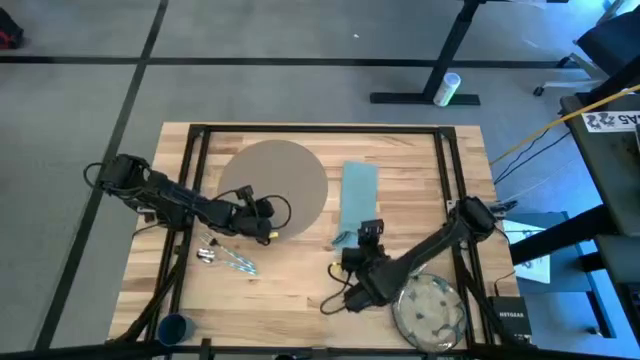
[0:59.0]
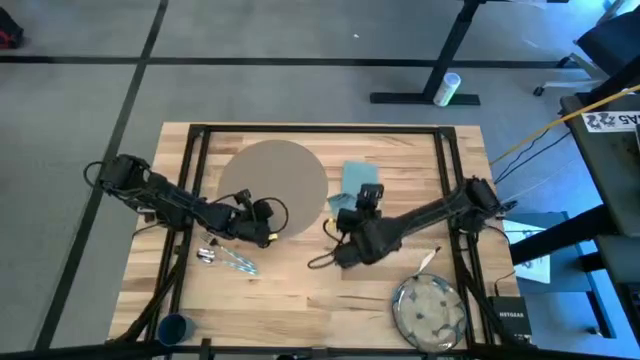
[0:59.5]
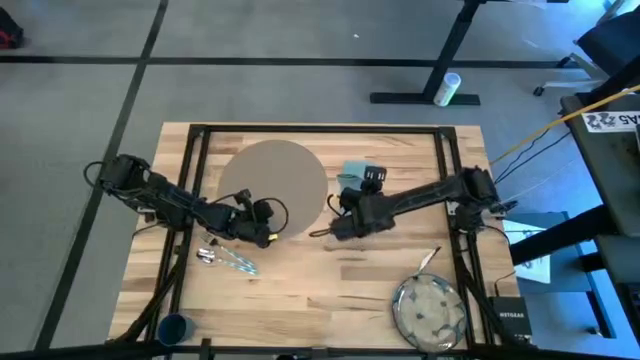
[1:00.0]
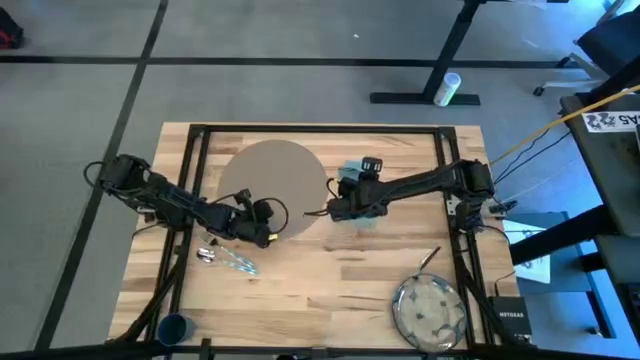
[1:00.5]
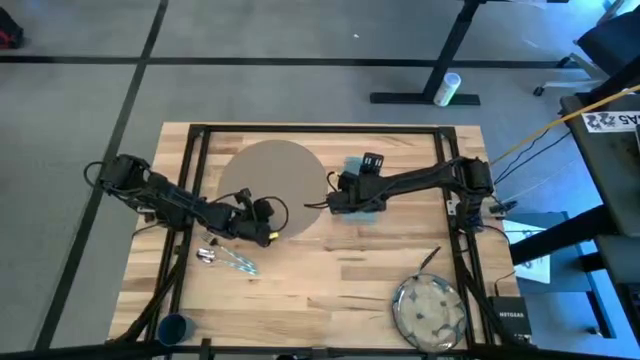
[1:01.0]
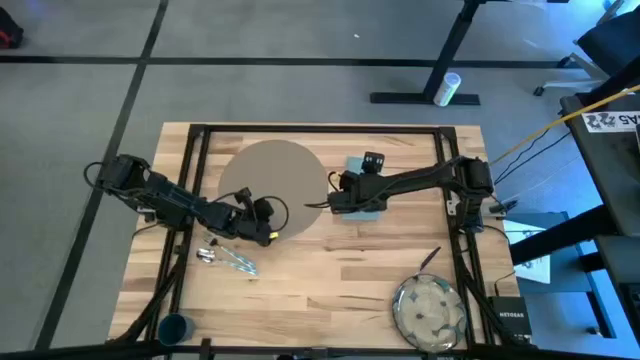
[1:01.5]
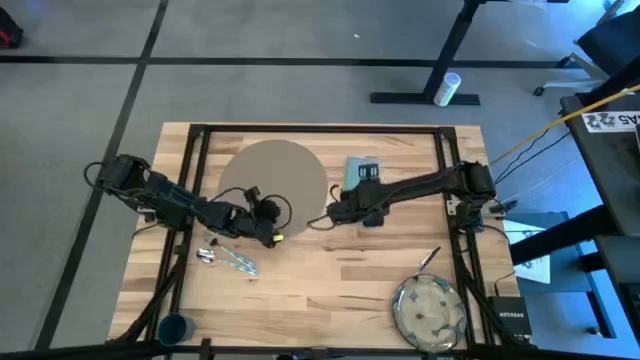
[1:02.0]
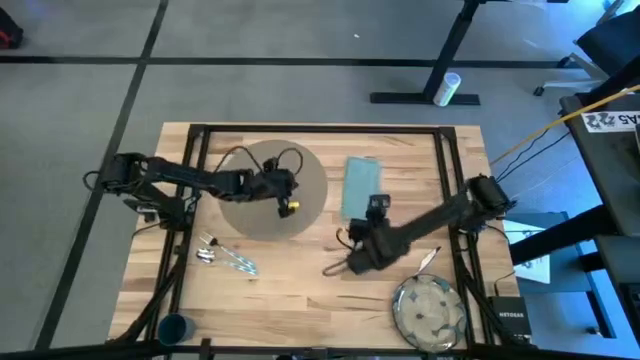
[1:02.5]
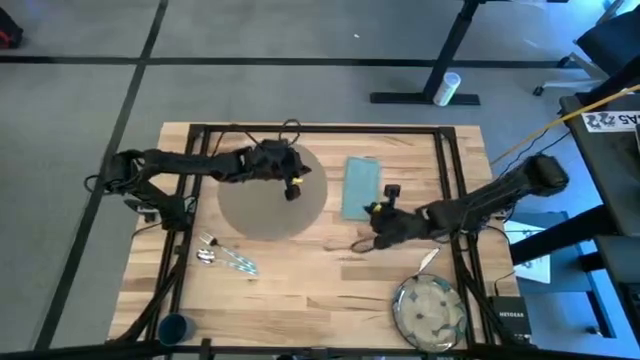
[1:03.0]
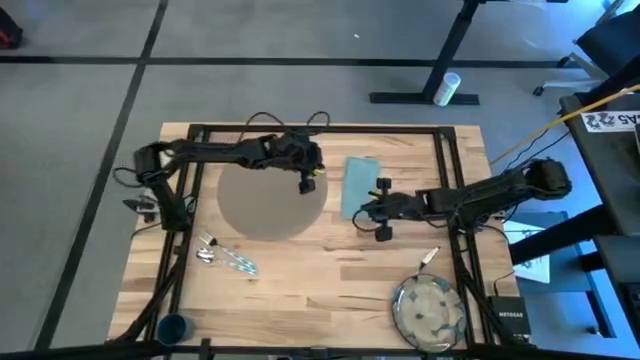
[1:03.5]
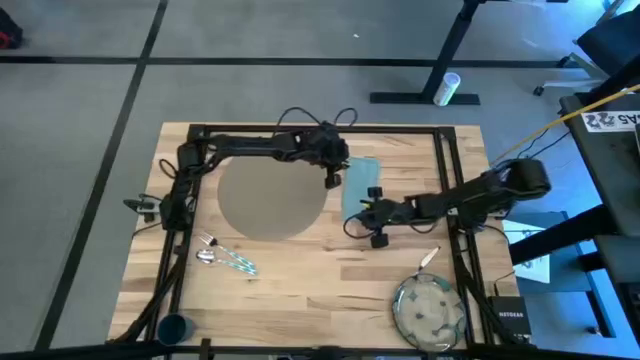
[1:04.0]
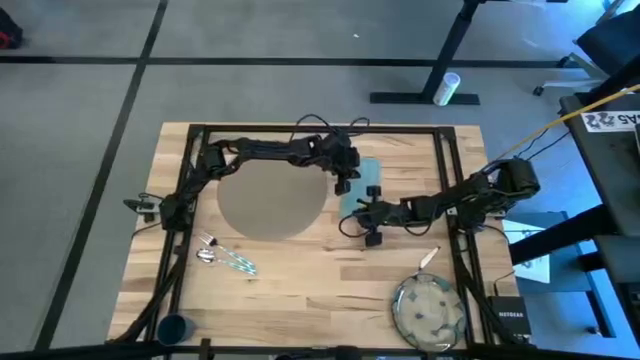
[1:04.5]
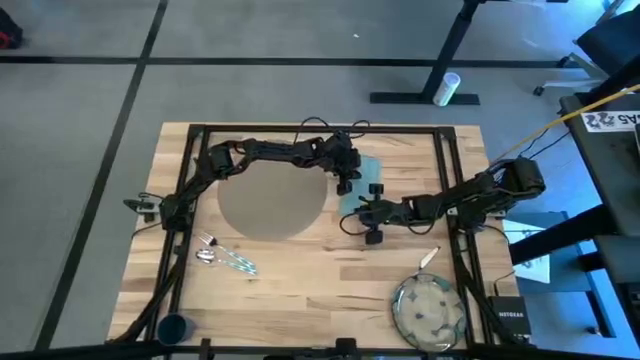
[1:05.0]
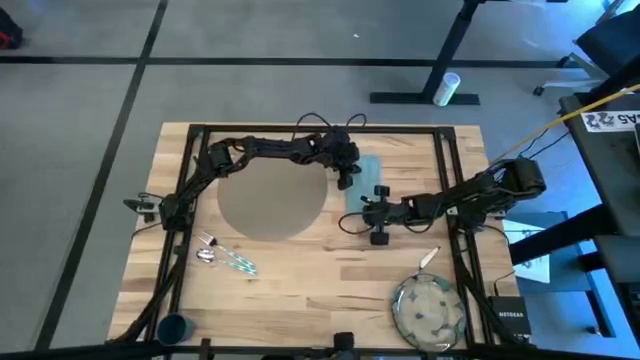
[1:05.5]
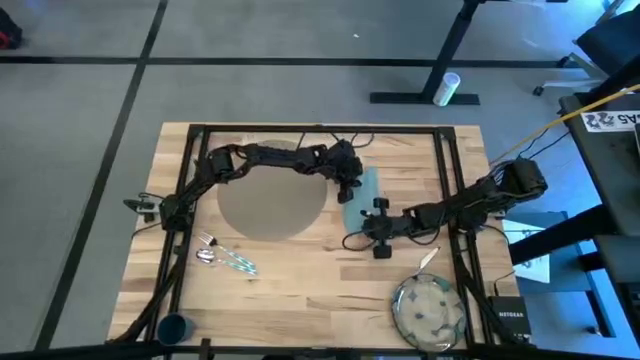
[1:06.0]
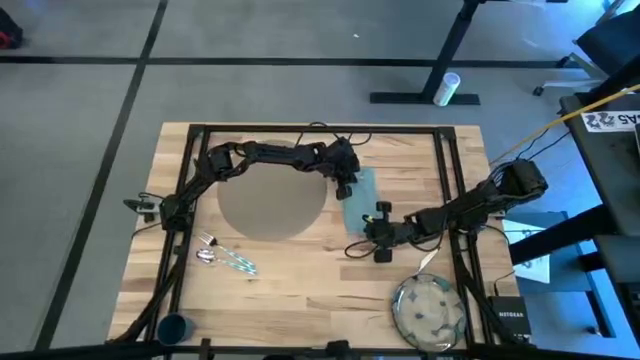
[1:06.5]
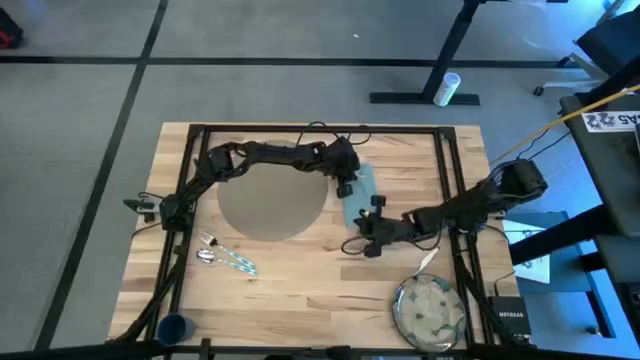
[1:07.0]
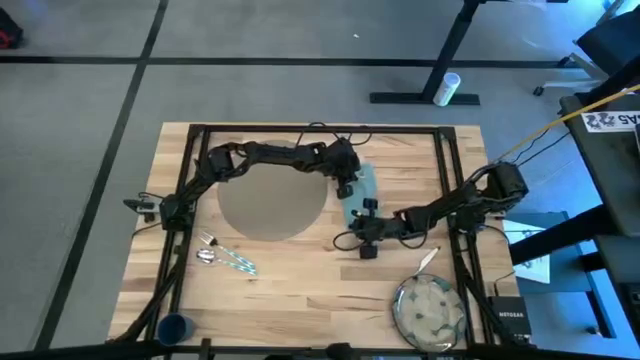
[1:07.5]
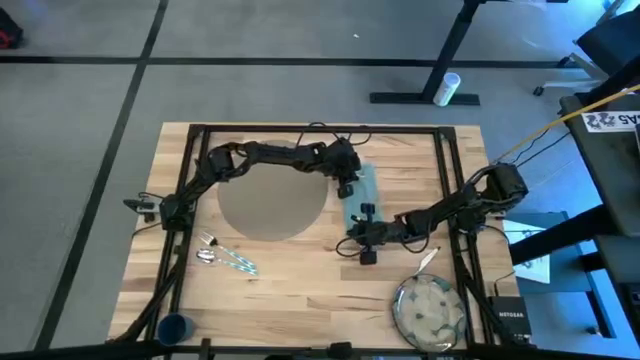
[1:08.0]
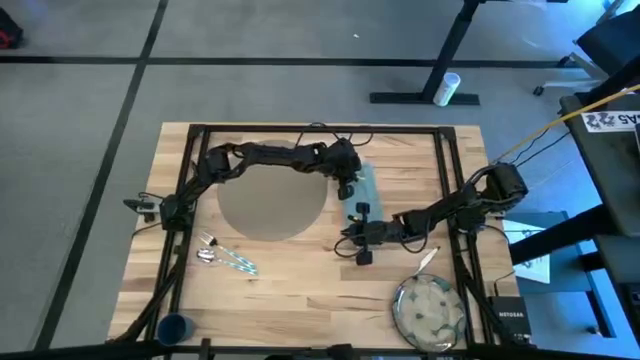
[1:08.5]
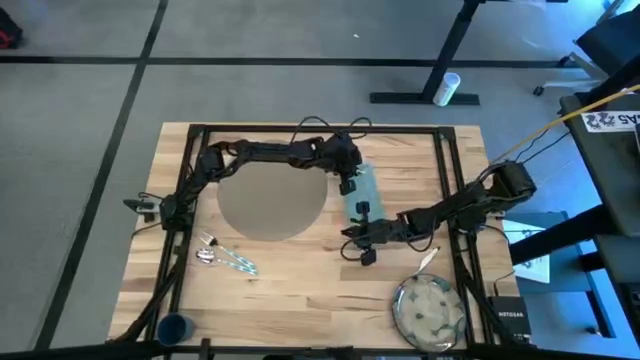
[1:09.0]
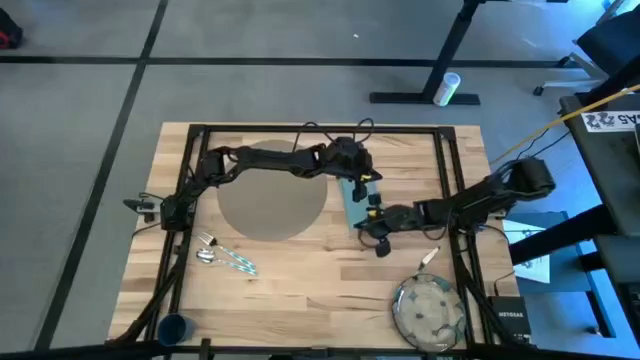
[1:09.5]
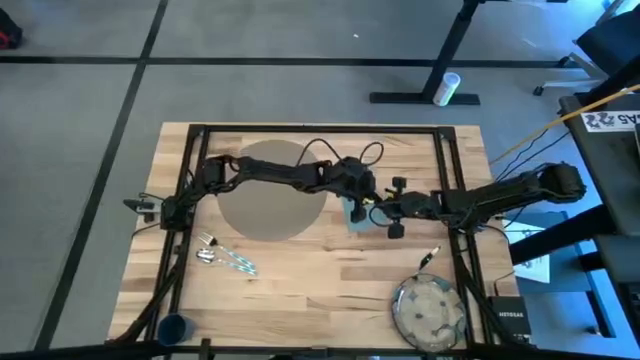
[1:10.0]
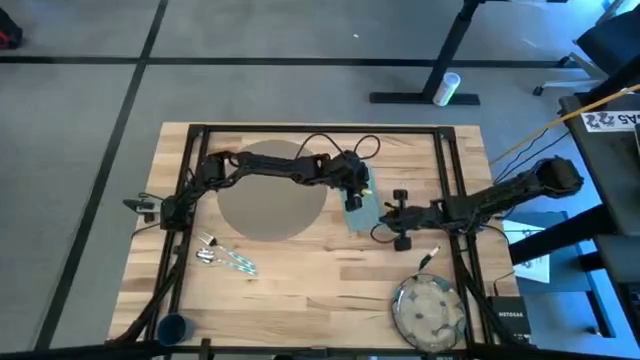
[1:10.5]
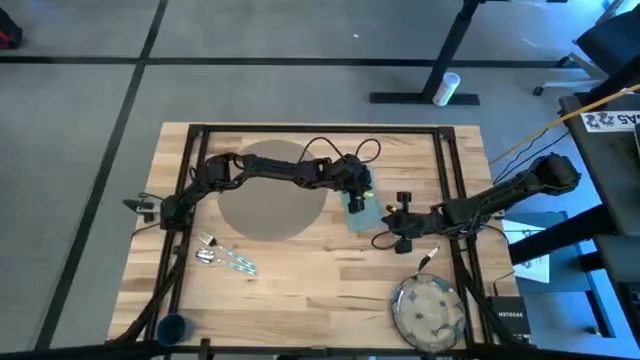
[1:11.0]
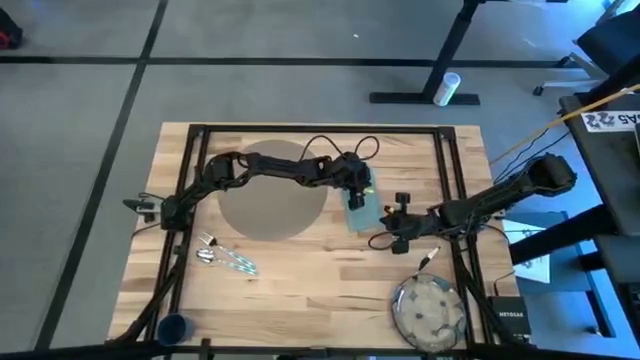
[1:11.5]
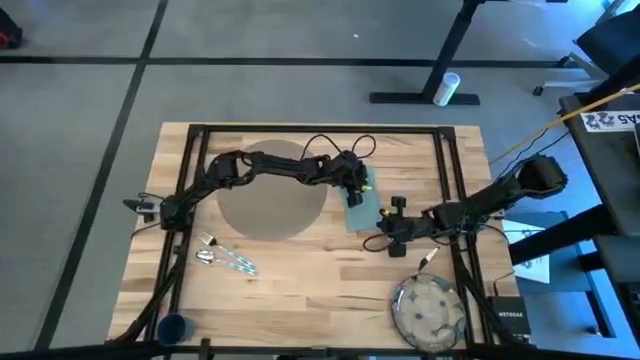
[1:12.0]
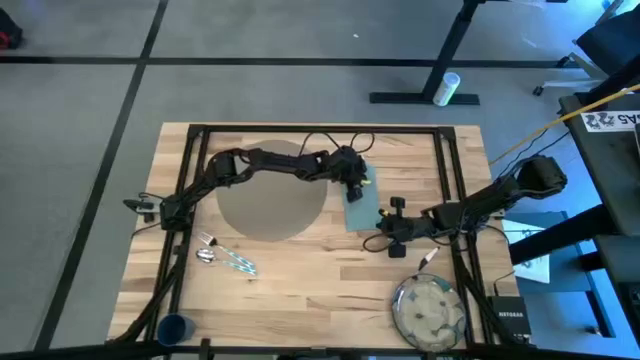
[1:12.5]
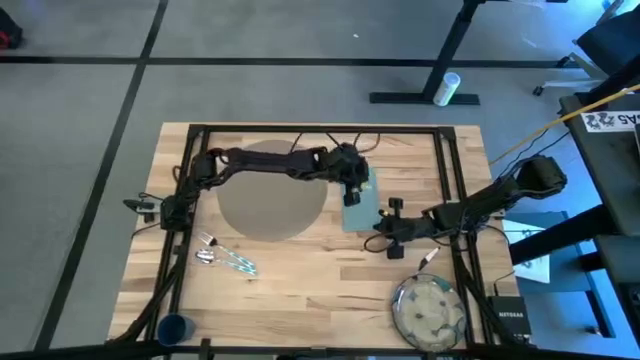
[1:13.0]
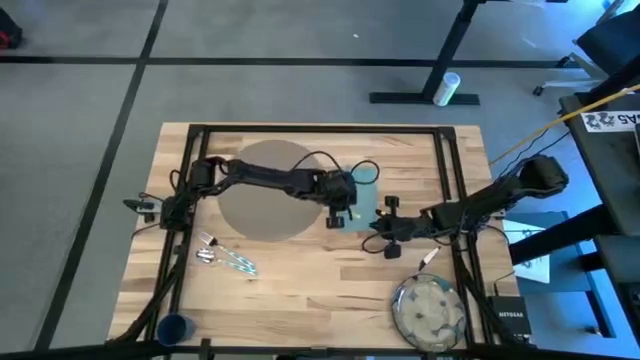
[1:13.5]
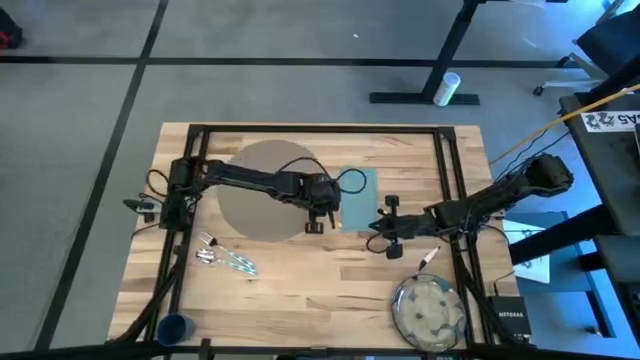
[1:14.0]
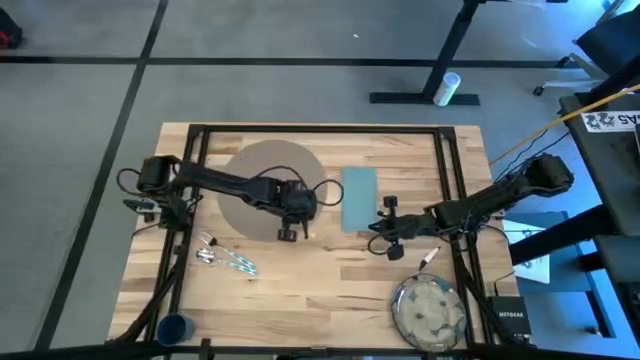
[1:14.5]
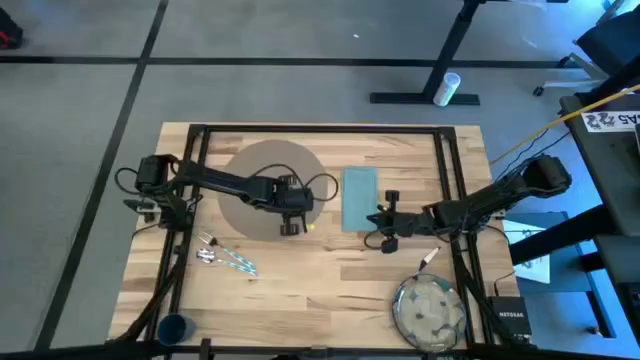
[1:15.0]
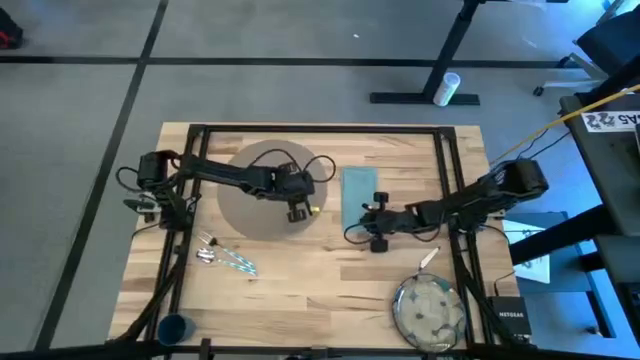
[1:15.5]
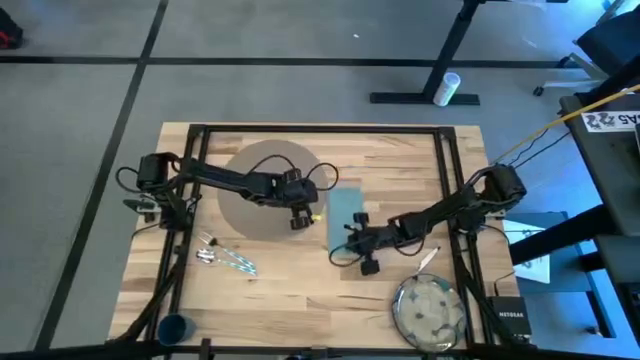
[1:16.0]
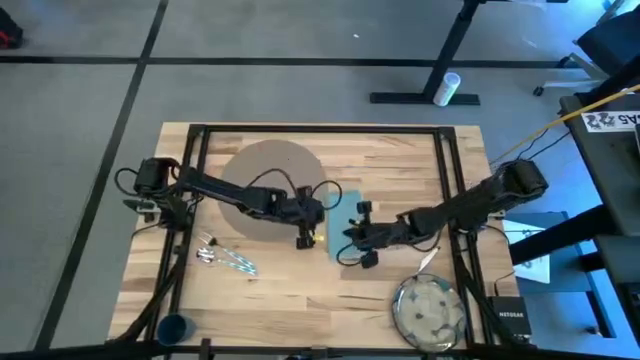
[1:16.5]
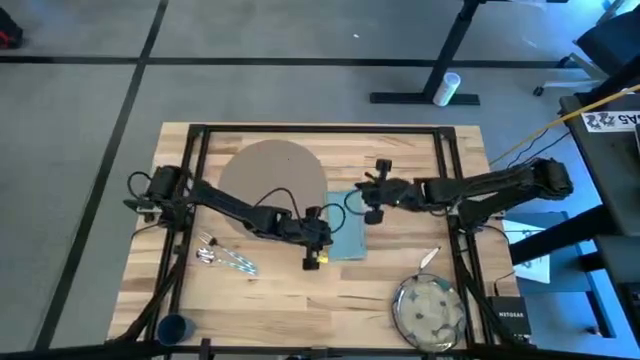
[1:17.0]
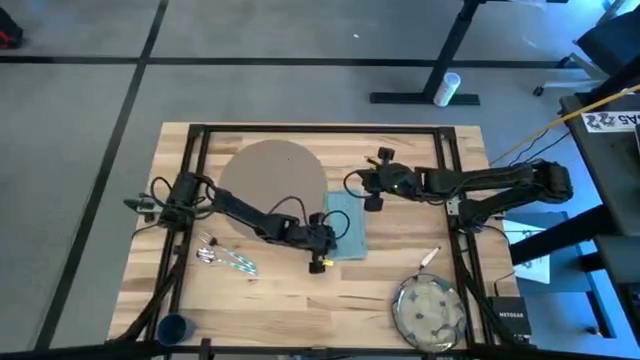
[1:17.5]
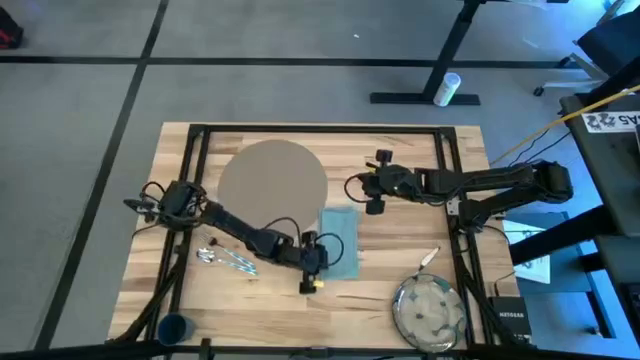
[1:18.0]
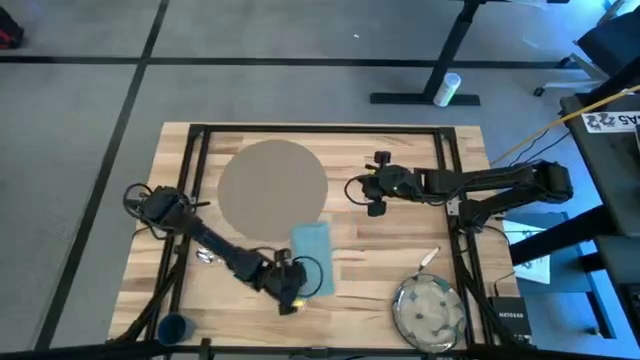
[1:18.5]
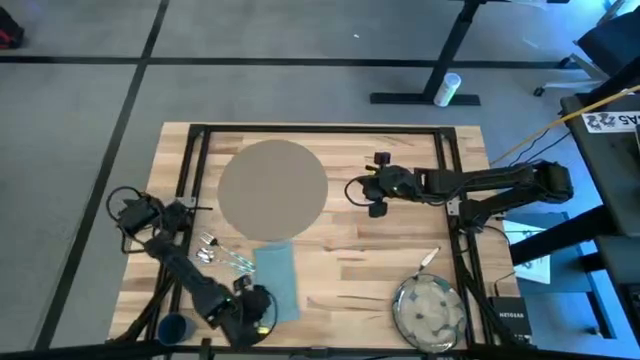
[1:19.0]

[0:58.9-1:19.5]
Task: Set table place
Fold the blue table napkin

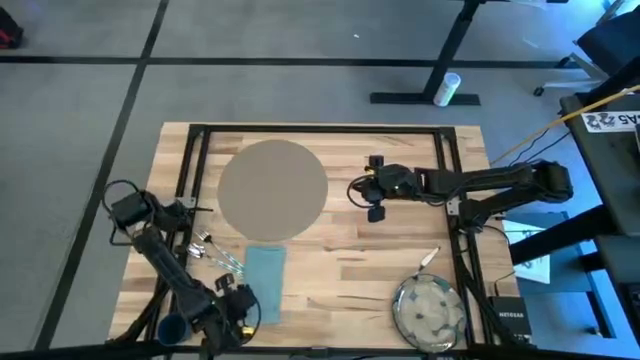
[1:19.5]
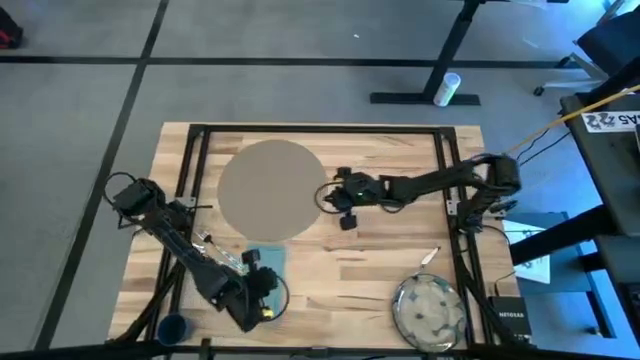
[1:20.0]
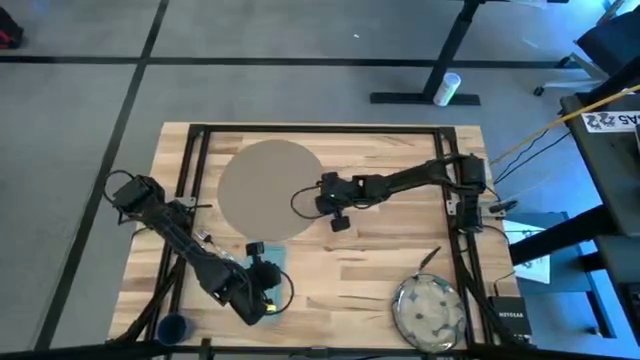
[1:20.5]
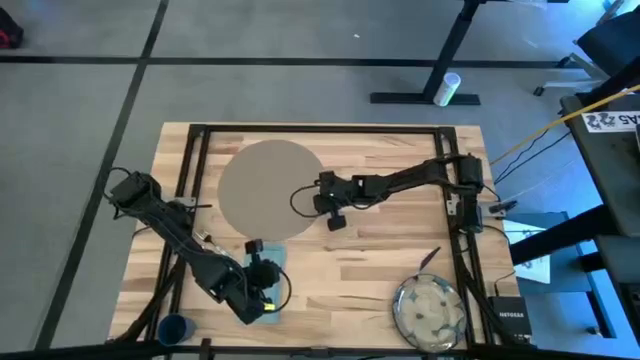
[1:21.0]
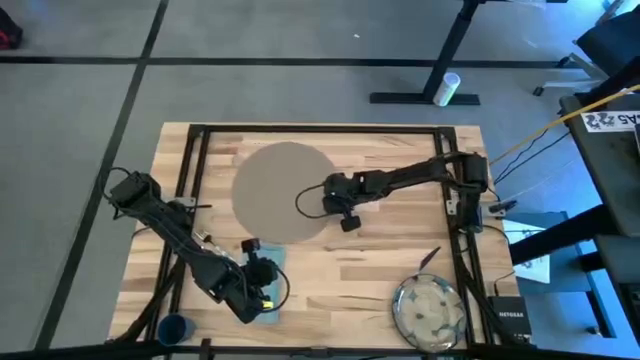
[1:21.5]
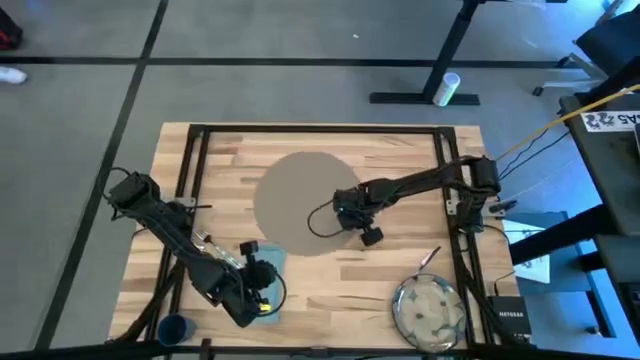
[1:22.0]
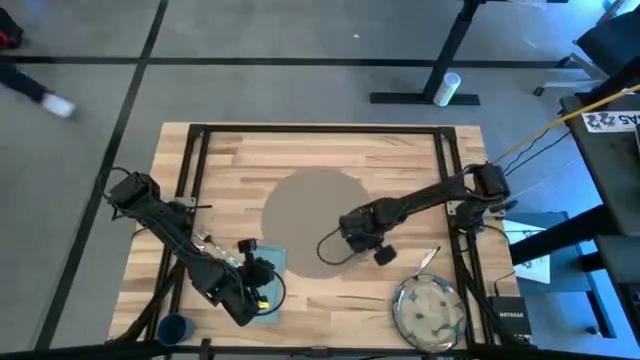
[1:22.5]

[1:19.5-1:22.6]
Adjust the brown tablemat
